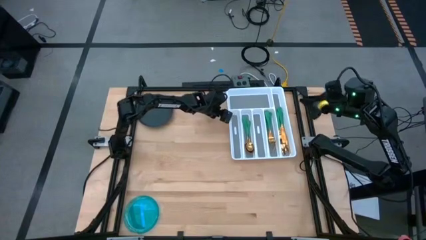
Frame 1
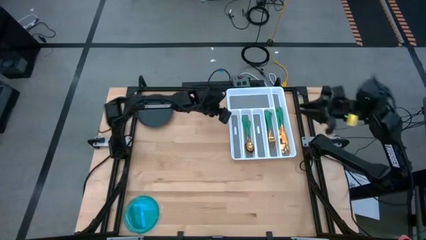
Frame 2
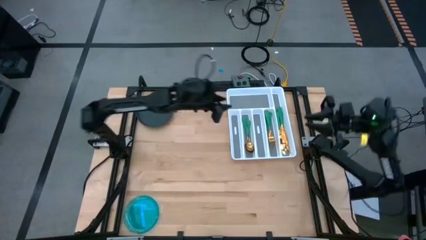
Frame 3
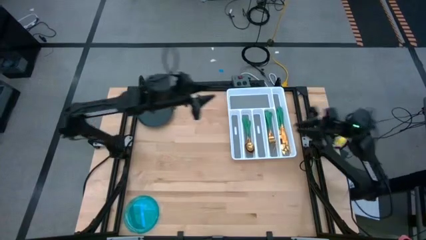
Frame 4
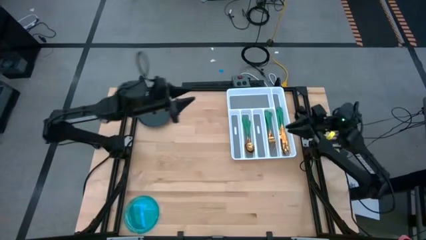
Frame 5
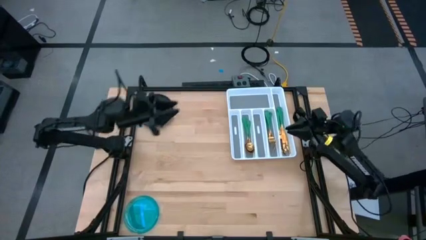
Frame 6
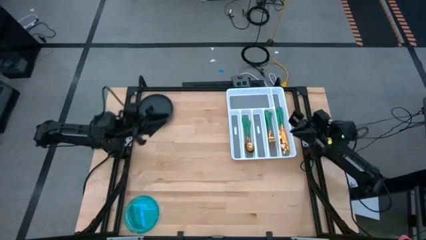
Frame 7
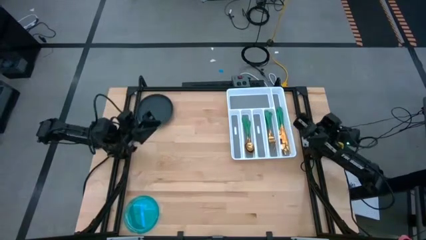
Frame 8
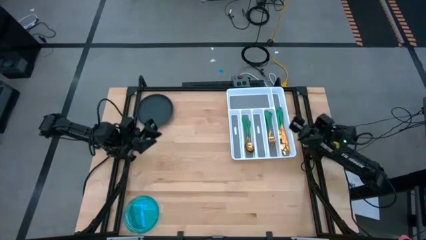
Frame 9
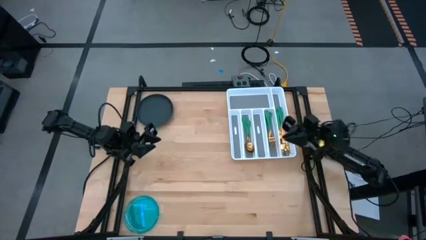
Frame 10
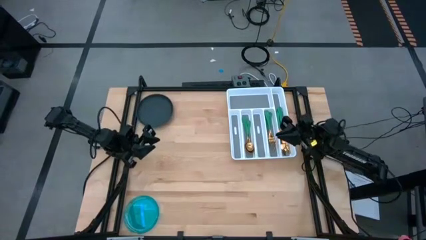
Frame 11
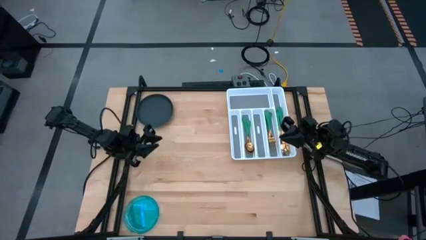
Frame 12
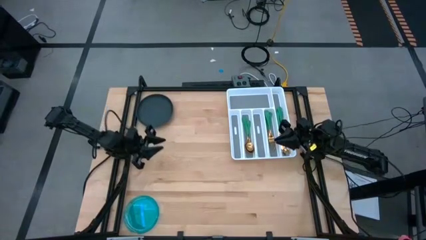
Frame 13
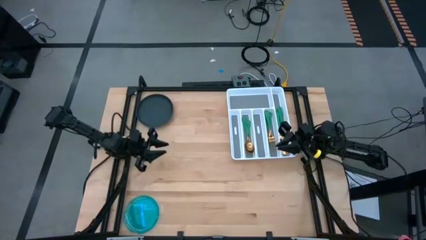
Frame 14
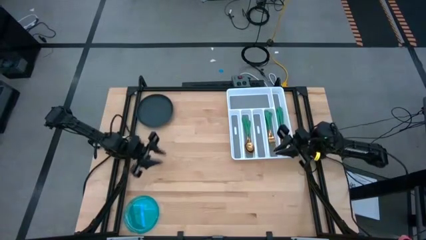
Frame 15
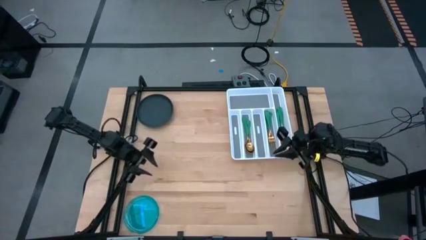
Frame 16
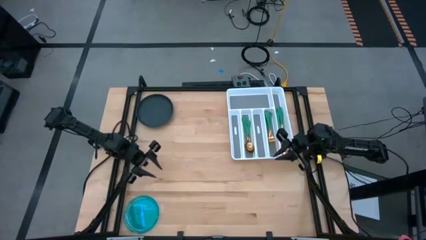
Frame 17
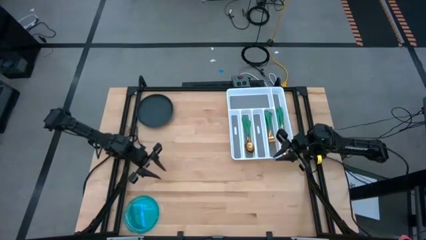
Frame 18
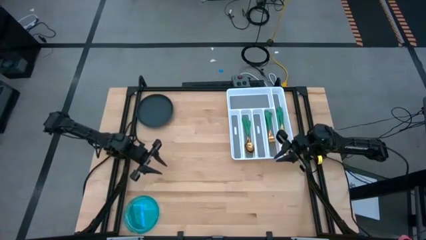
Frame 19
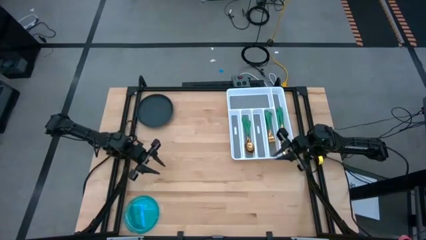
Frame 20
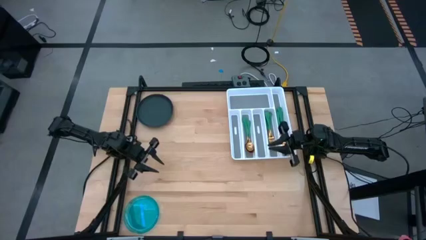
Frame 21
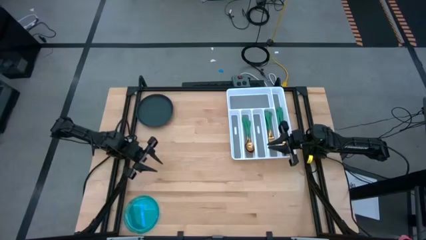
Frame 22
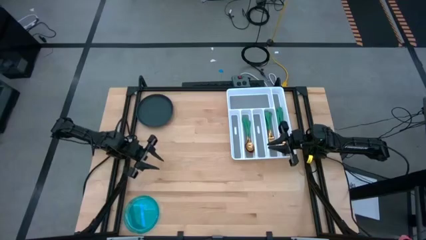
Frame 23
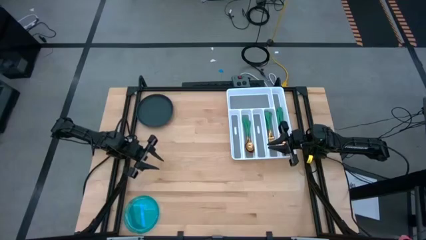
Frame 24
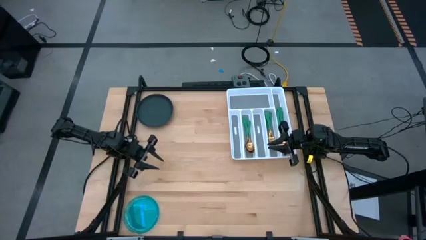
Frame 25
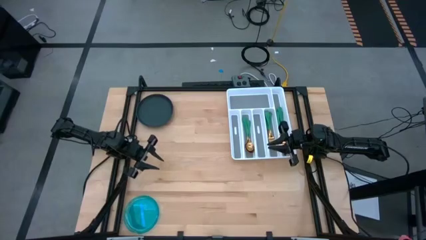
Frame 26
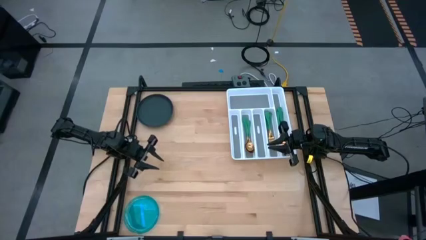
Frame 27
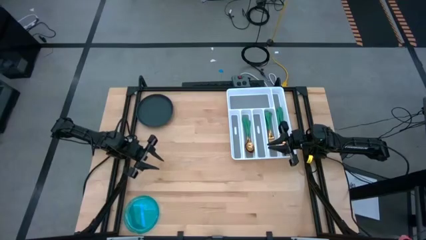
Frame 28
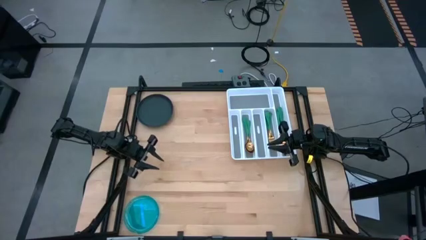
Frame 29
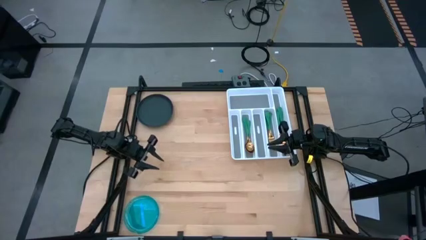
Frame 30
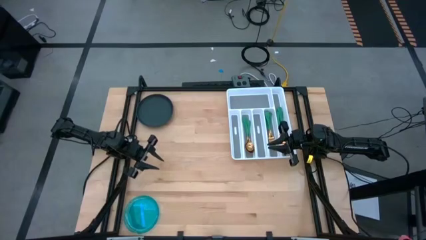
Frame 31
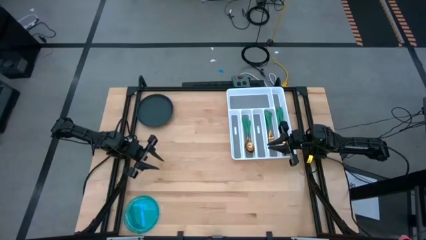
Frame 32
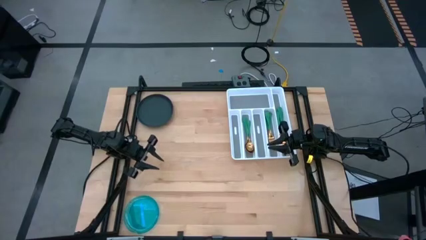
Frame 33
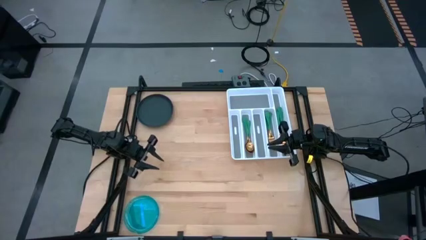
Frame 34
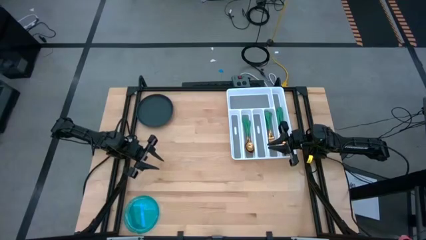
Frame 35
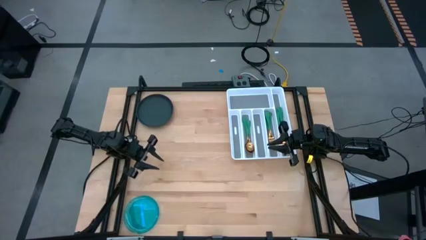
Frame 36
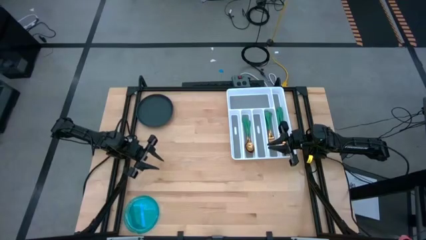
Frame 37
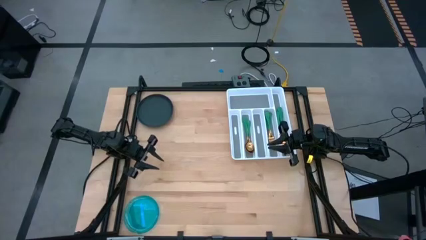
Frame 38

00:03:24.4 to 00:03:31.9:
Task: Sort silverware
Return to Home Position

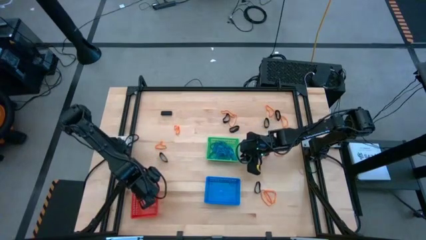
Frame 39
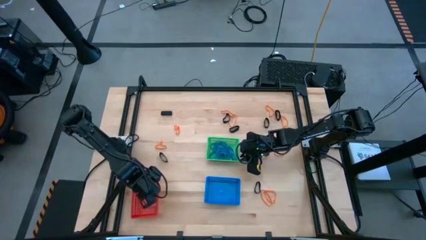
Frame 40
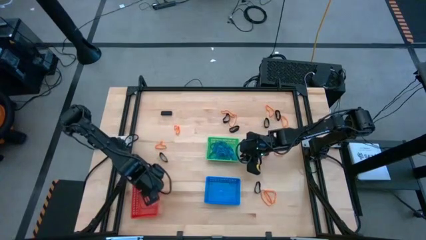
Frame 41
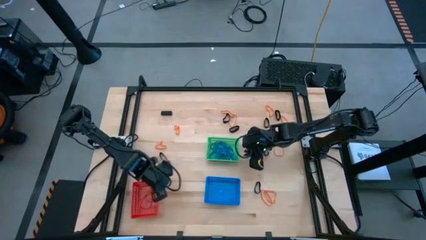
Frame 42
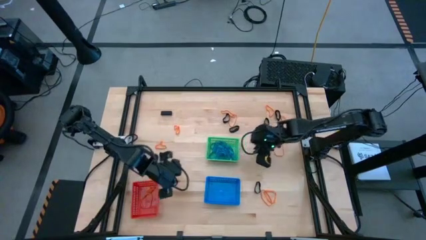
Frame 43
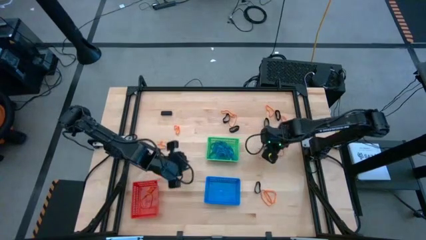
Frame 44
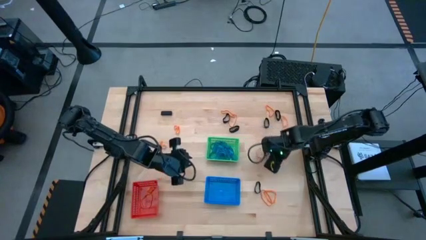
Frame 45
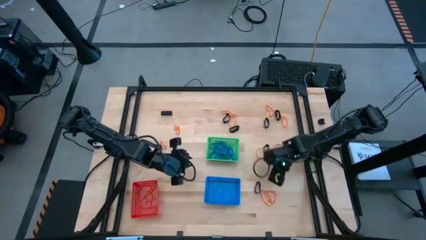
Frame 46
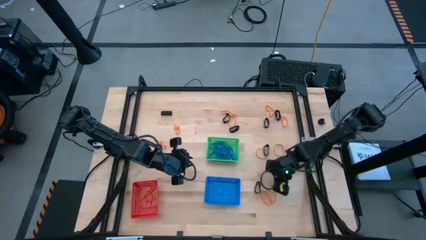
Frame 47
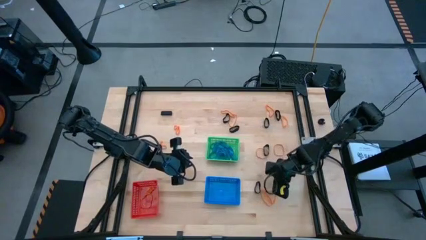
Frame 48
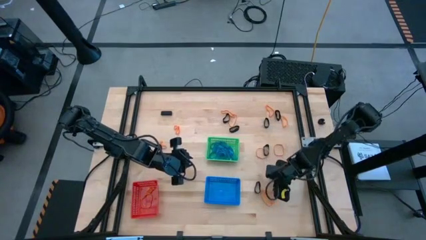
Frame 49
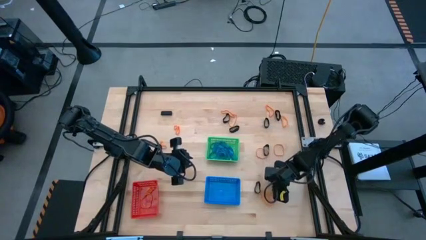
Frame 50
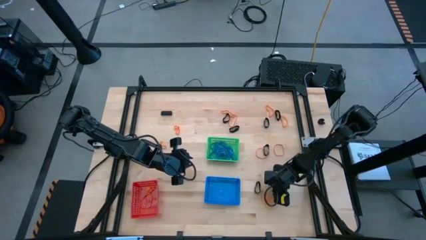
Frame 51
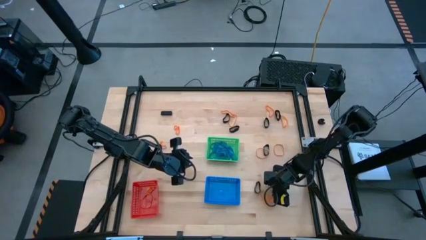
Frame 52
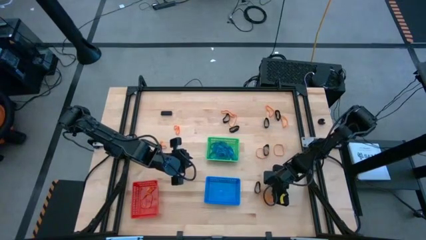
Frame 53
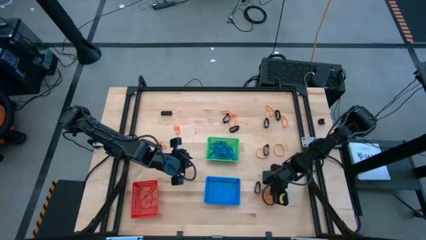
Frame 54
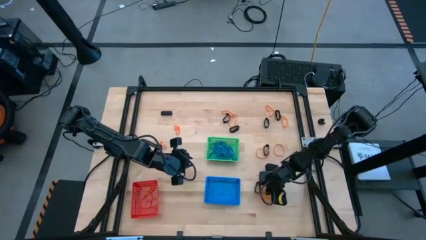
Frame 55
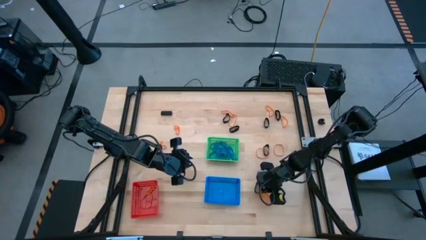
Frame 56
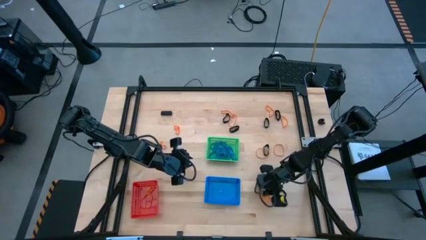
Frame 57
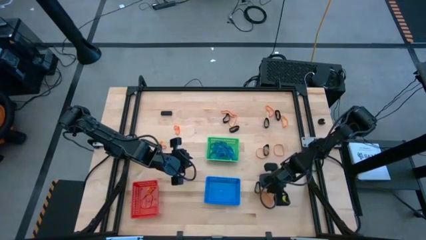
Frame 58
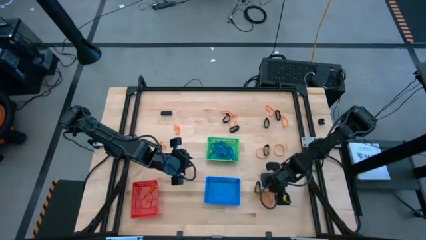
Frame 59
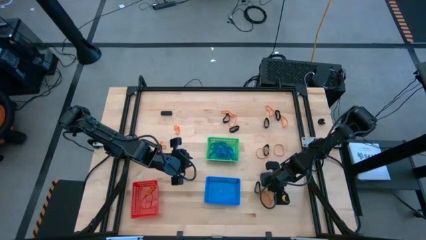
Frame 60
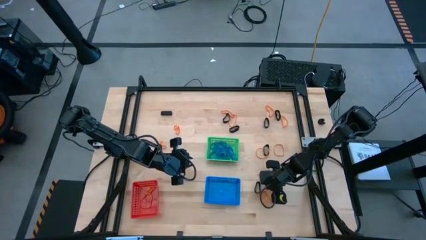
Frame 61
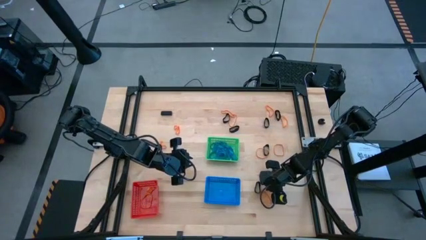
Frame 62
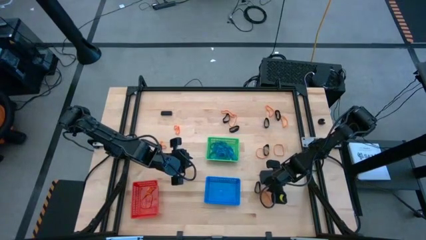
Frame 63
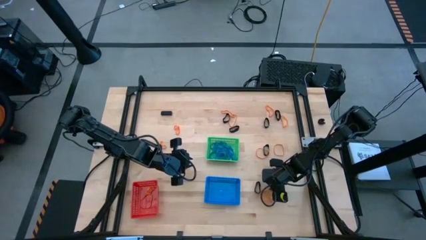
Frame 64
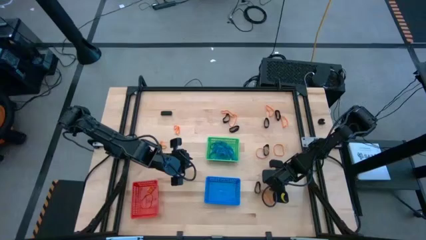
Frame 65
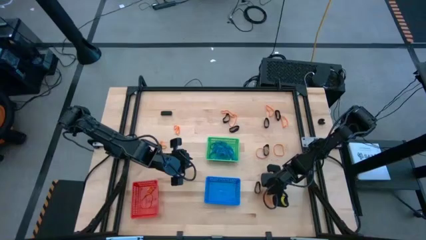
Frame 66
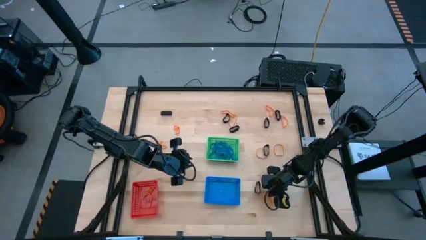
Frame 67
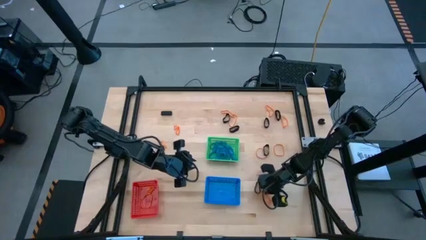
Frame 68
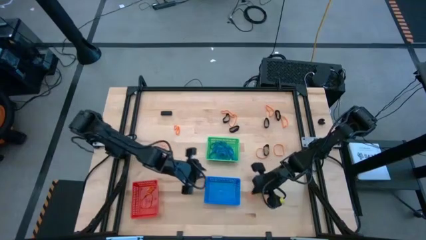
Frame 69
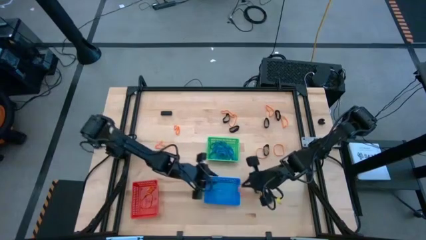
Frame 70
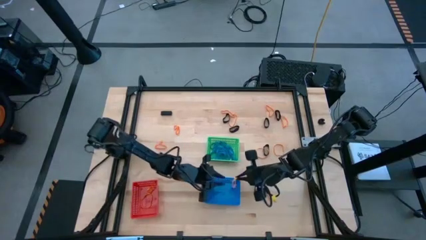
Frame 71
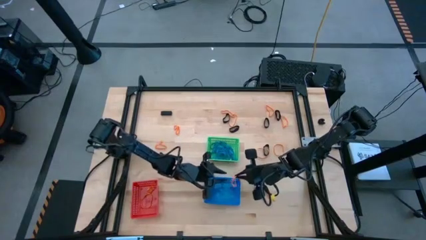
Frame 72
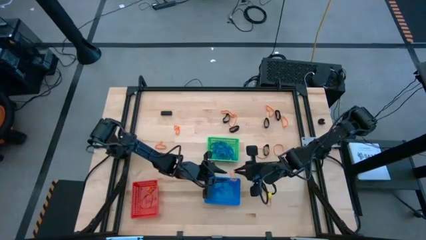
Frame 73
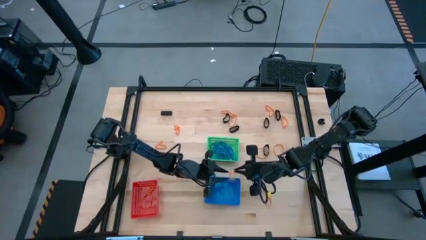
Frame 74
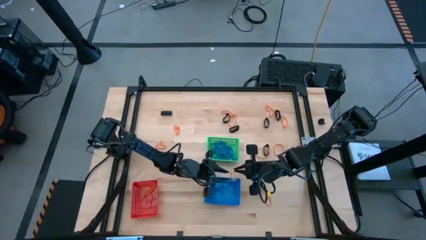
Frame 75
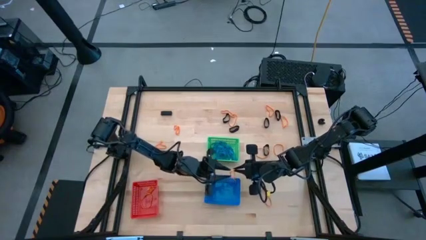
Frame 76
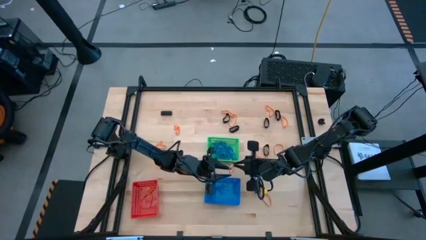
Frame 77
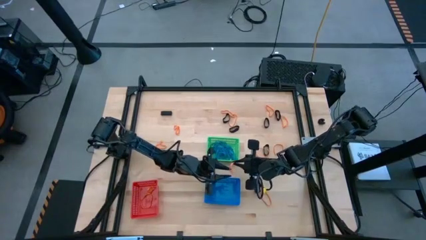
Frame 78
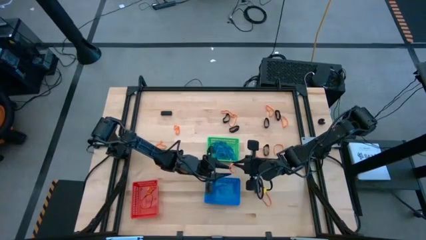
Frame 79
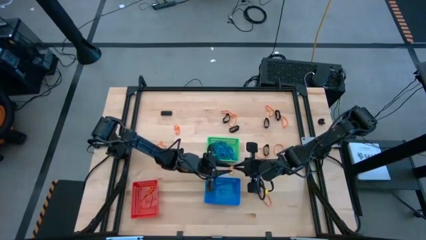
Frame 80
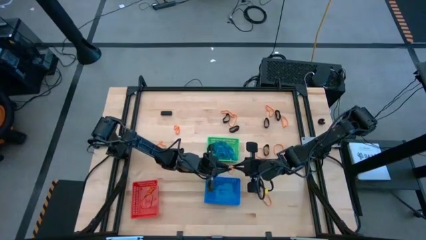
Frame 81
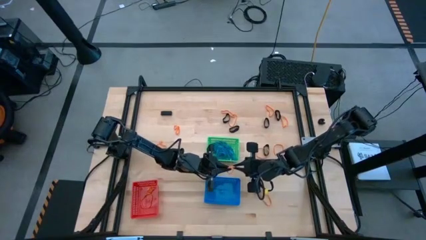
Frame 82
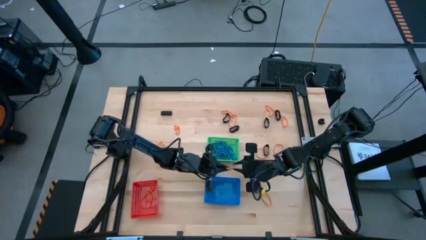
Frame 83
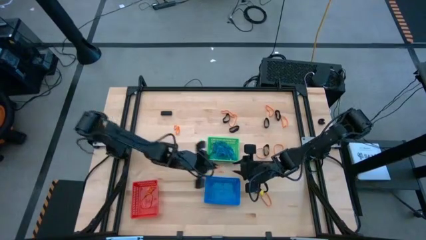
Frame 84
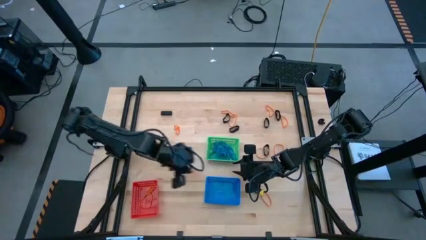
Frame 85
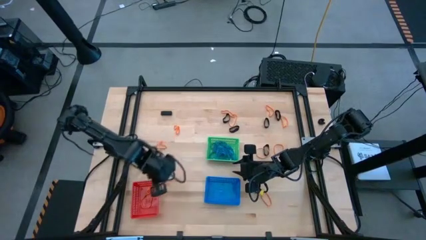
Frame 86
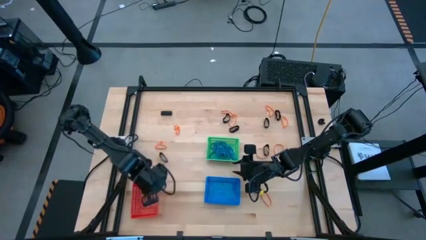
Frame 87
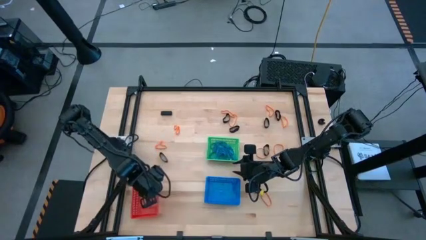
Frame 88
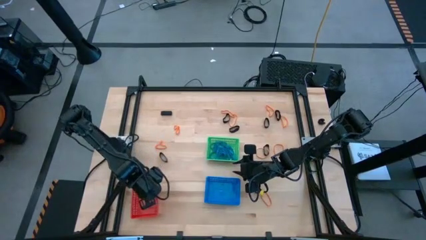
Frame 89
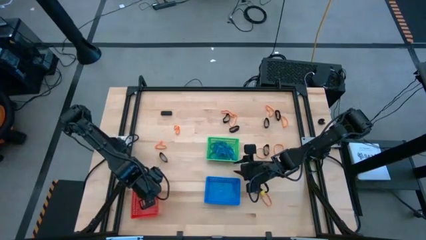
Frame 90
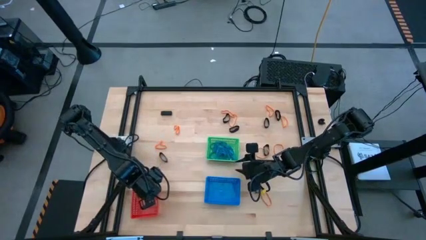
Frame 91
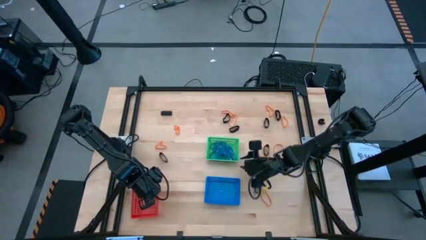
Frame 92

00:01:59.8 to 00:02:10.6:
Task: Sort rubber bands into baskets
Put the orange rubberband into the red bin
